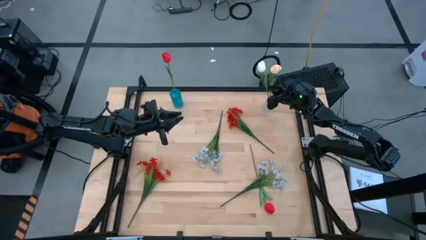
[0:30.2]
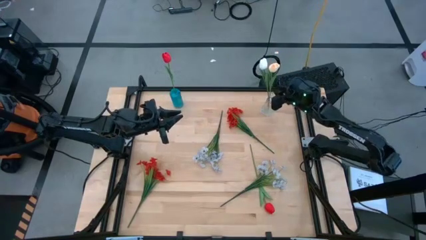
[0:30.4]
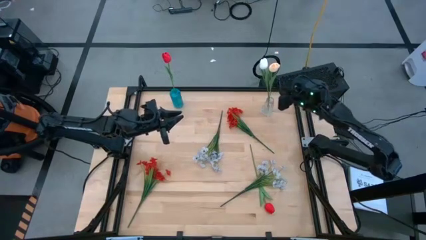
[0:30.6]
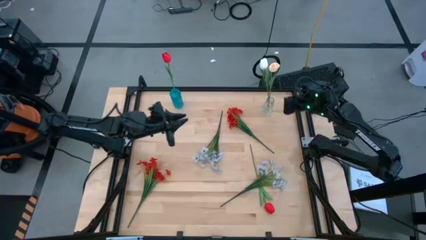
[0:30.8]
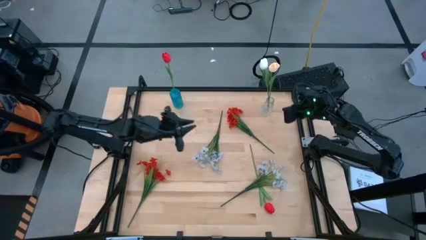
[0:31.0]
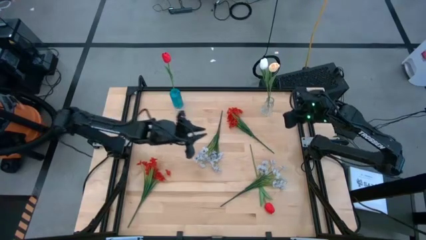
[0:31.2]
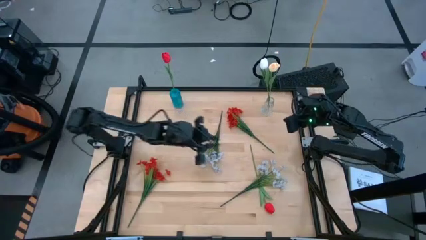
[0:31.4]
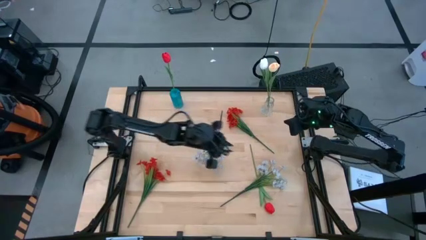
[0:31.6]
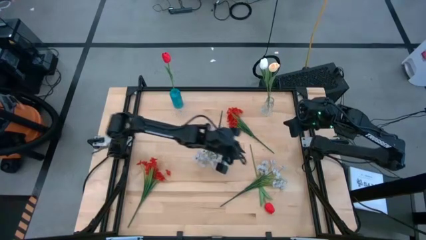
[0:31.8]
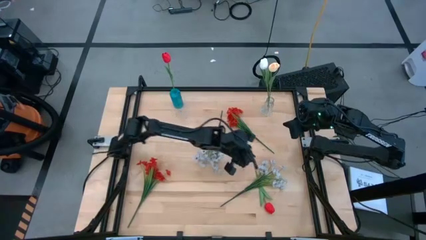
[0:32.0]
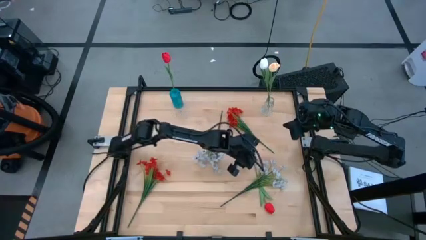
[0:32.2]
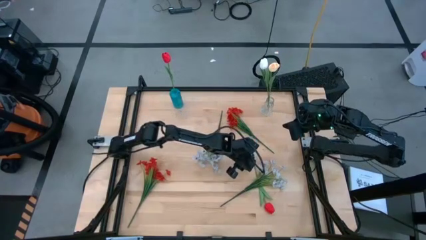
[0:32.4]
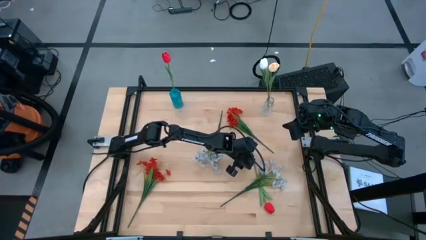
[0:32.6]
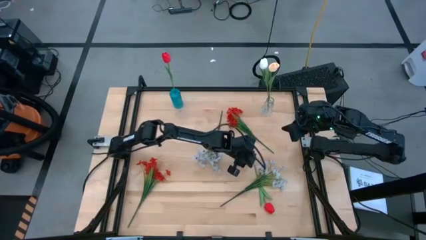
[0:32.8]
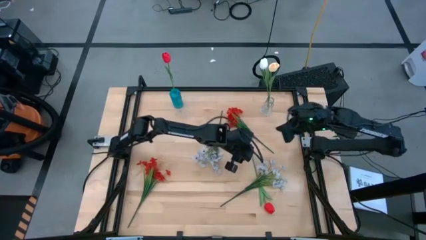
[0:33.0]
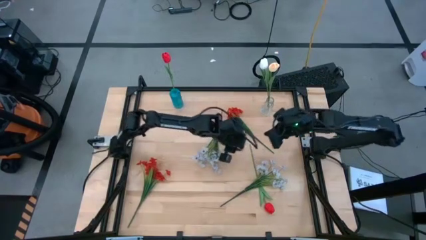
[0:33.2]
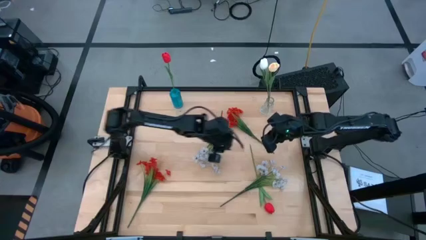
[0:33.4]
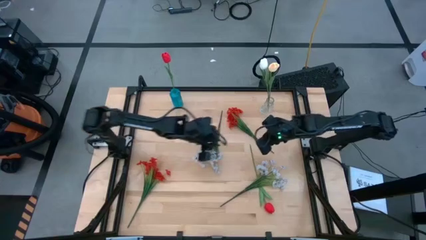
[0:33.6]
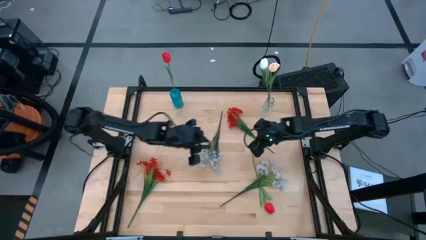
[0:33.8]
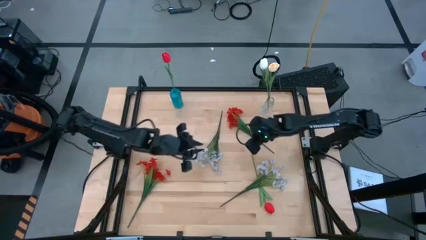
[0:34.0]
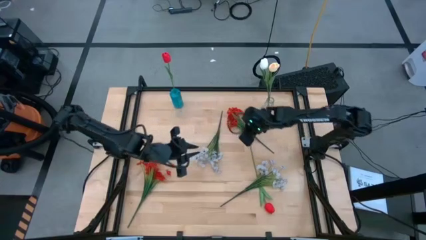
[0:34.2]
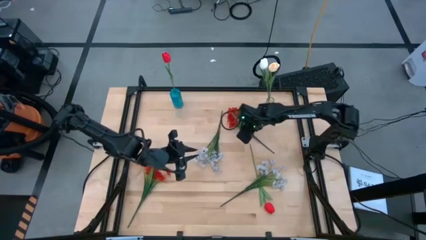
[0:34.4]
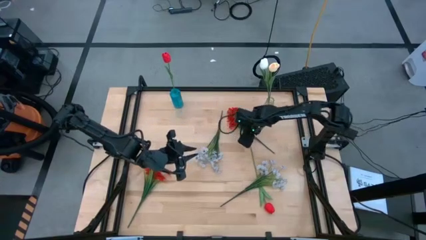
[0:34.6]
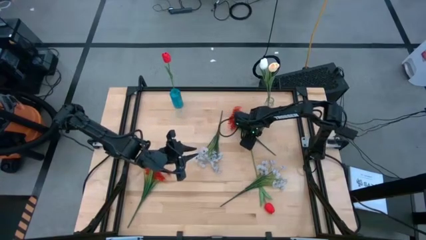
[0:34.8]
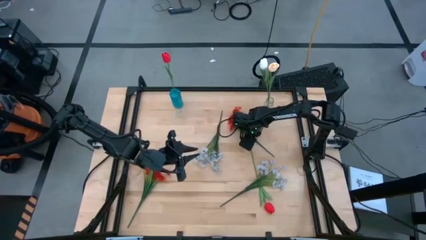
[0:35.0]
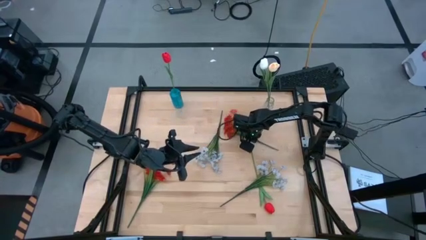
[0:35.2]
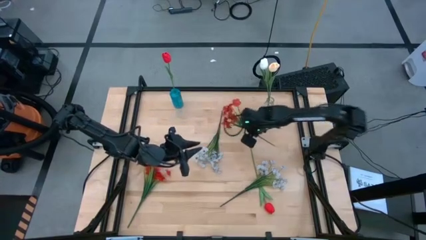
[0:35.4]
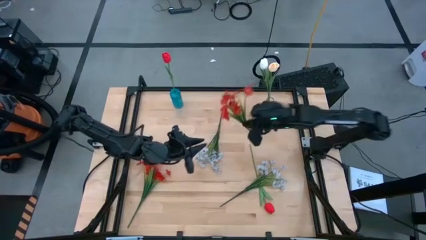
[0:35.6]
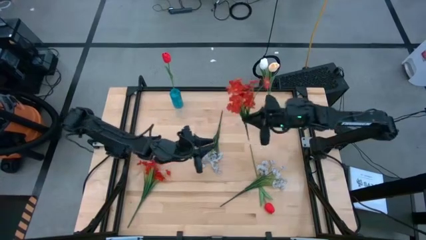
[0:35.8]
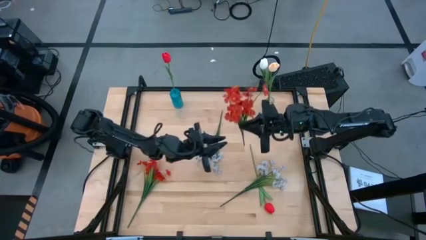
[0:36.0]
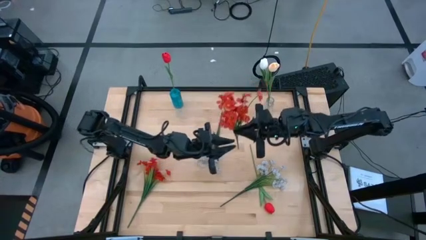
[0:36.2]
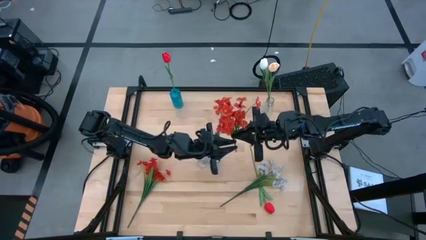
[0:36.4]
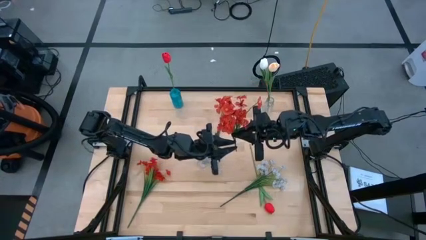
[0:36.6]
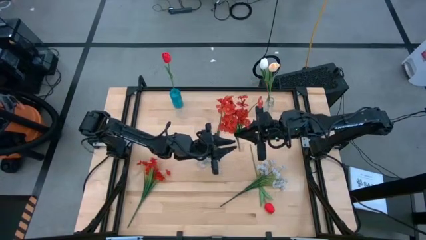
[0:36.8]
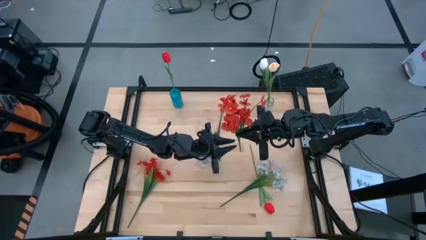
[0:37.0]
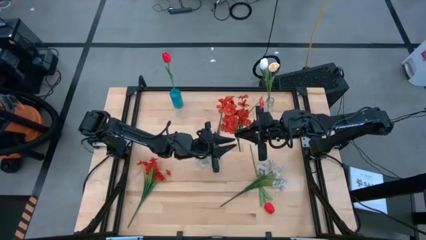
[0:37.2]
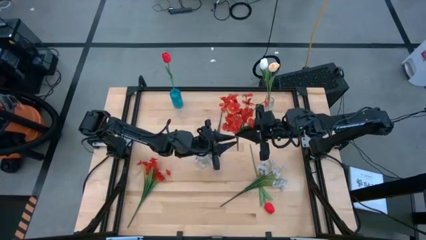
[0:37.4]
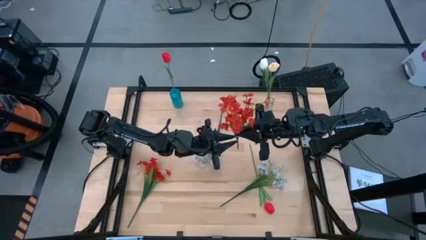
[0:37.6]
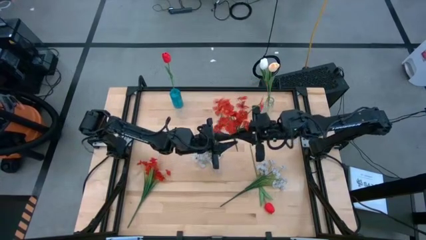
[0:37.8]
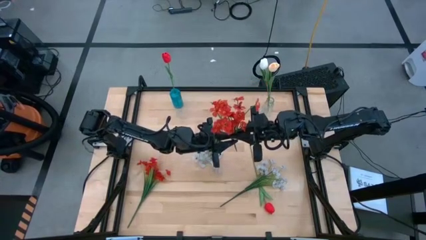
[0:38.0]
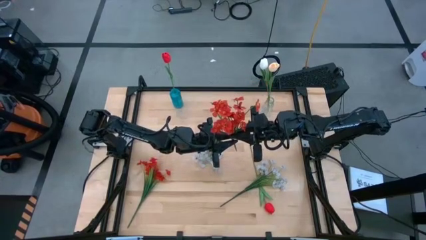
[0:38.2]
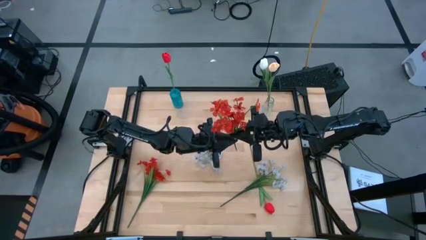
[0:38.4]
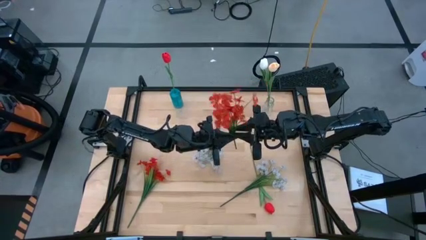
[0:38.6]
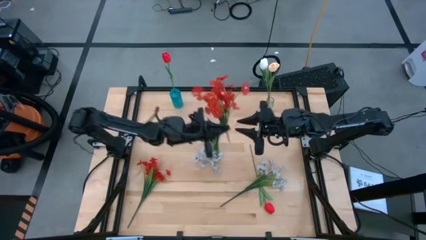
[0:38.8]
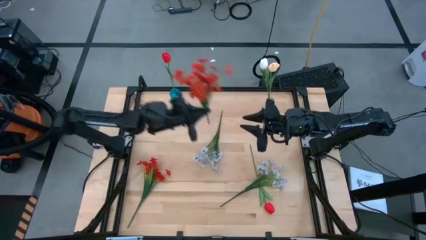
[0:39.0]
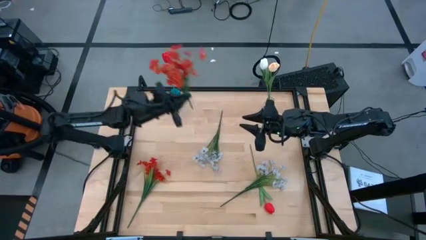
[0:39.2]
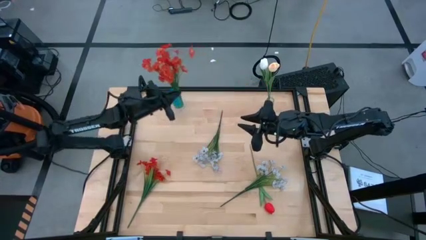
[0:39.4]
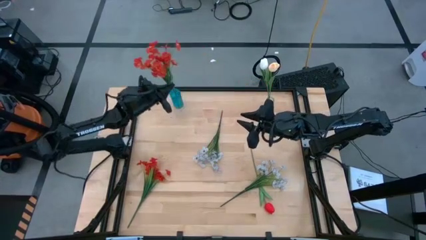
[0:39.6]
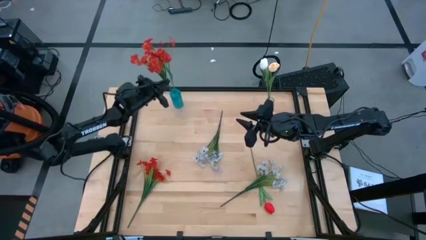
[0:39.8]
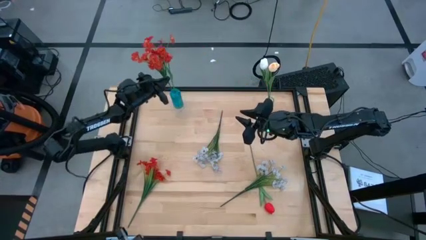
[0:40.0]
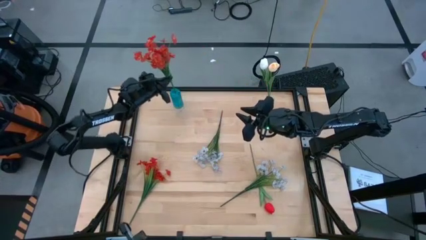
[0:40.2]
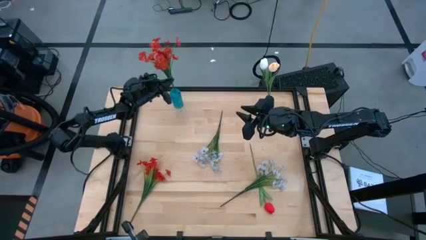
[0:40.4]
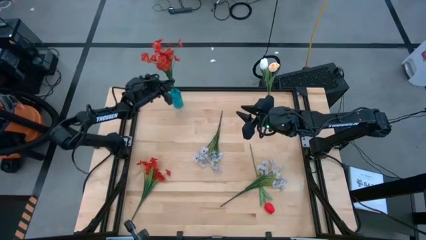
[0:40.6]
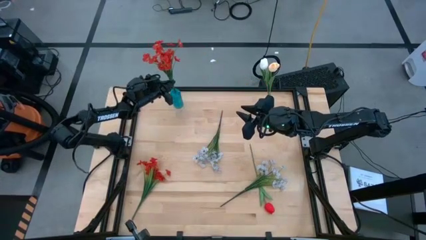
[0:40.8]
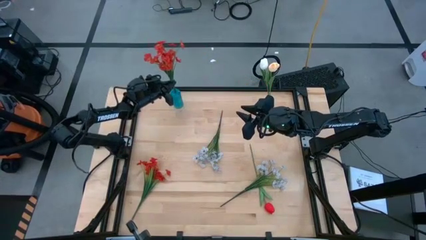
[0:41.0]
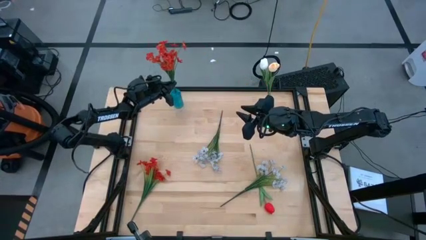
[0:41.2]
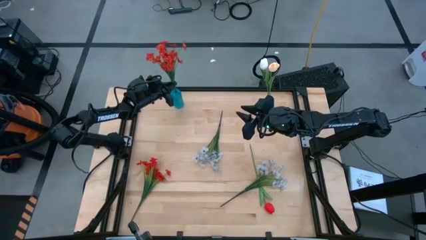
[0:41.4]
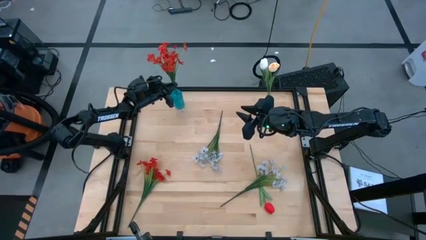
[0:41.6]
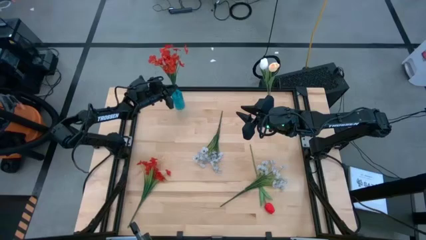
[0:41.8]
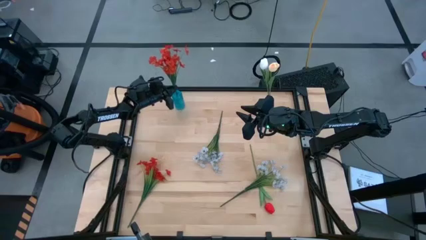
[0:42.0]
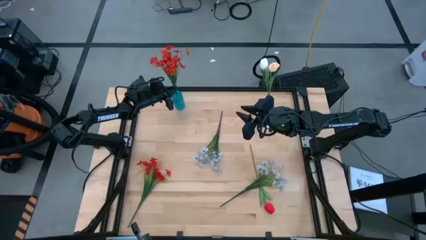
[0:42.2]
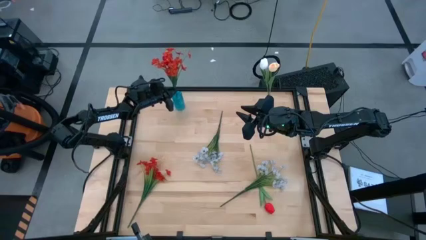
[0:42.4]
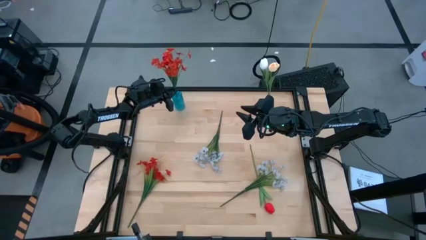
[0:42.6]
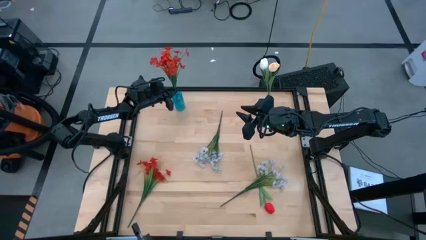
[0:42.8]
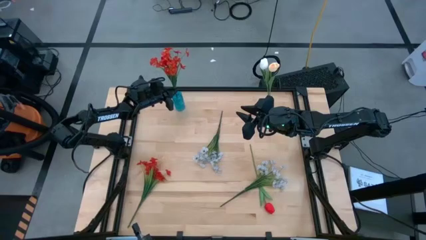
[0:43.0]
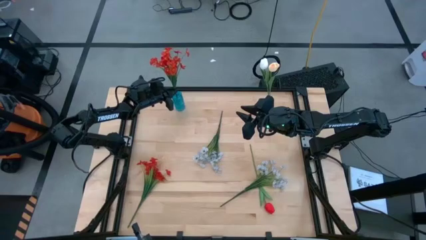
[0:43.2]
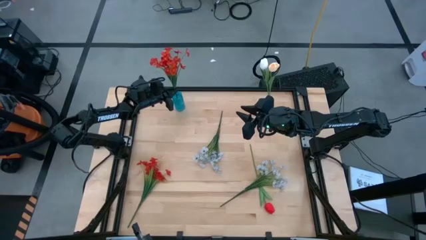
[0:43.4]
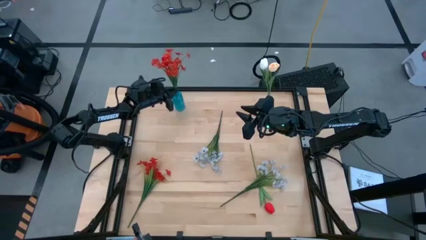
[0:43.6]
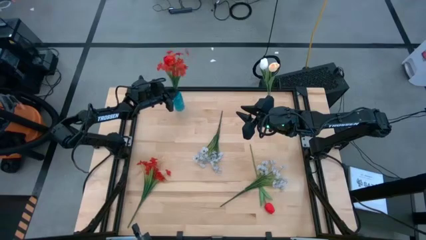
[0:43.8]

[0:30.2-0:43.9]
Task: Sort flowers into vase by color
Put the top orange flowers into the blue vase
